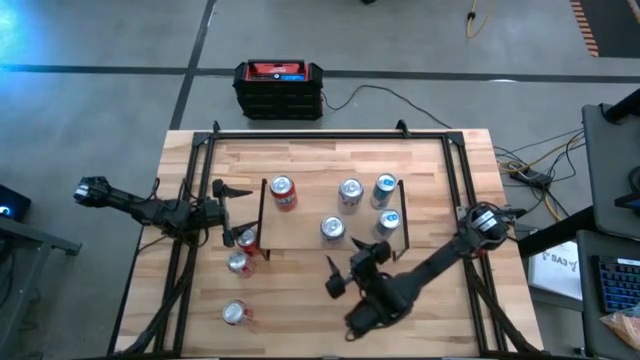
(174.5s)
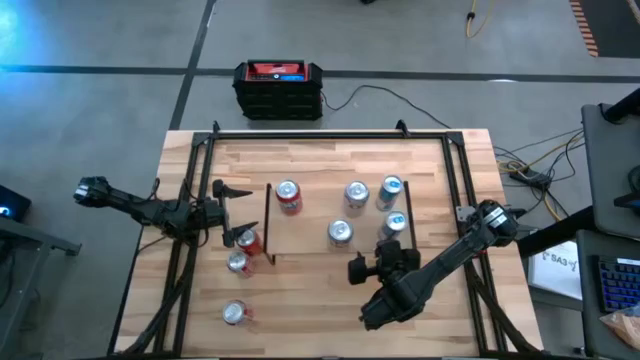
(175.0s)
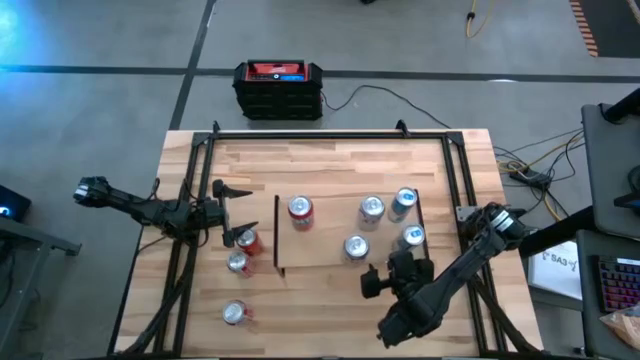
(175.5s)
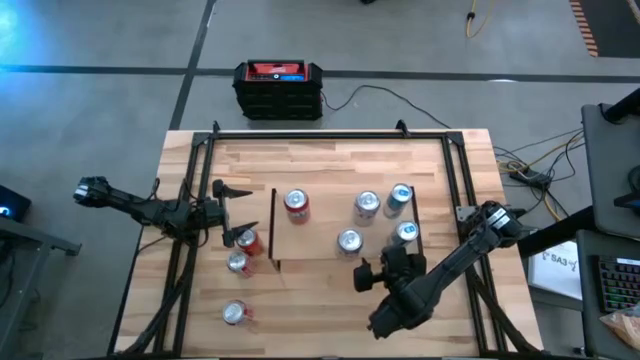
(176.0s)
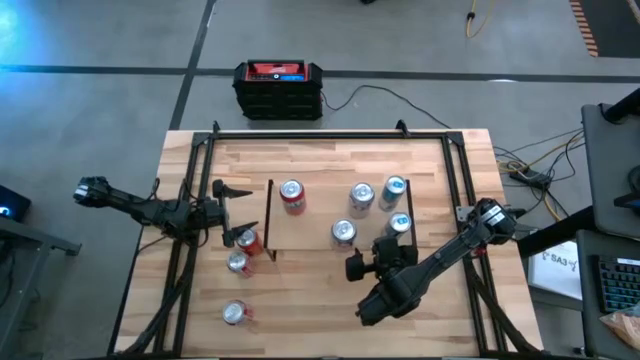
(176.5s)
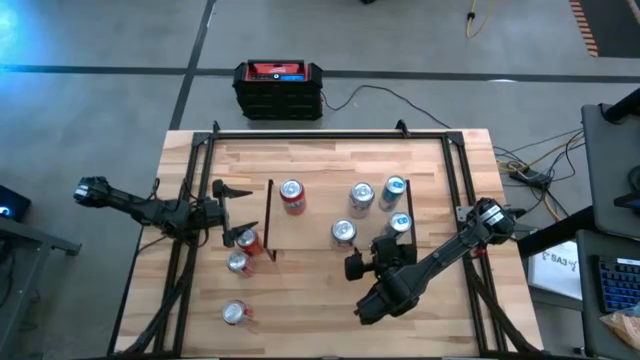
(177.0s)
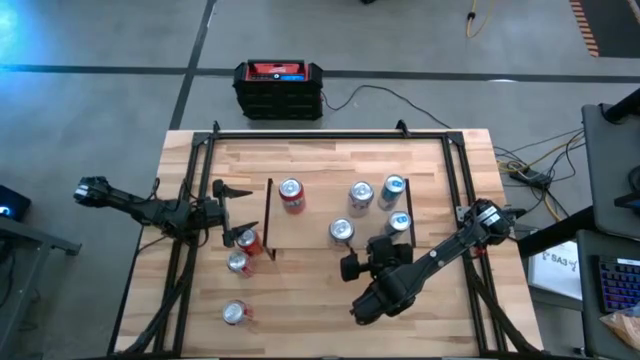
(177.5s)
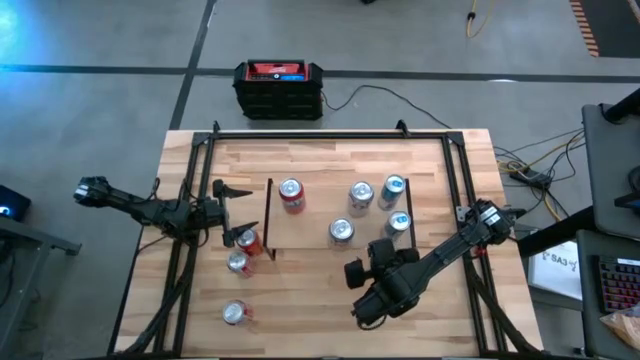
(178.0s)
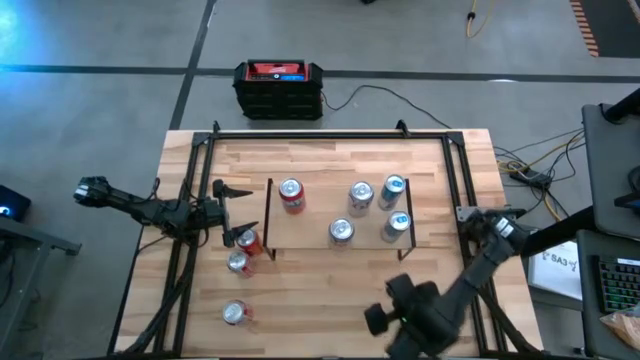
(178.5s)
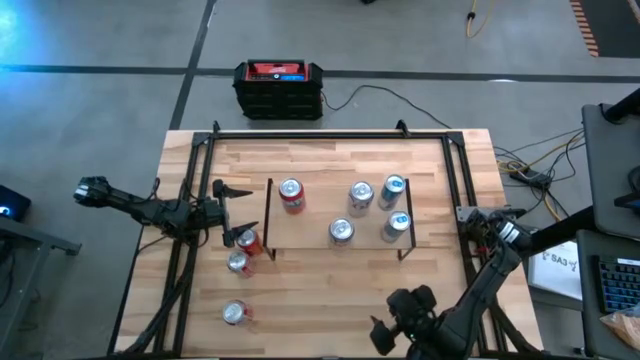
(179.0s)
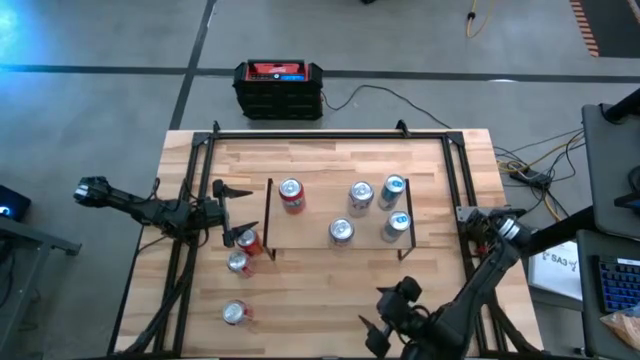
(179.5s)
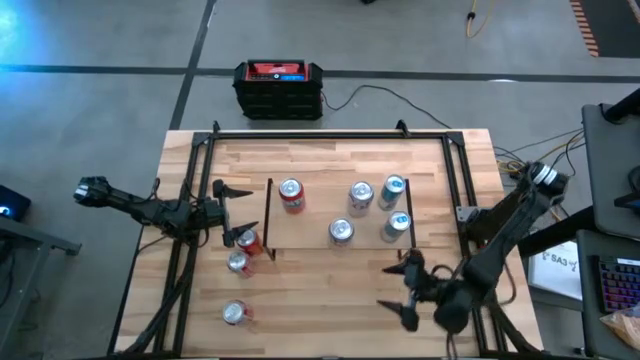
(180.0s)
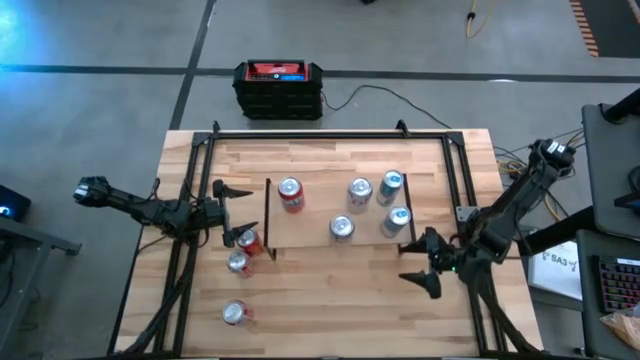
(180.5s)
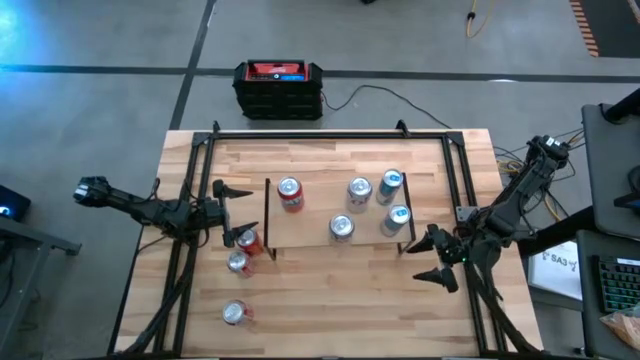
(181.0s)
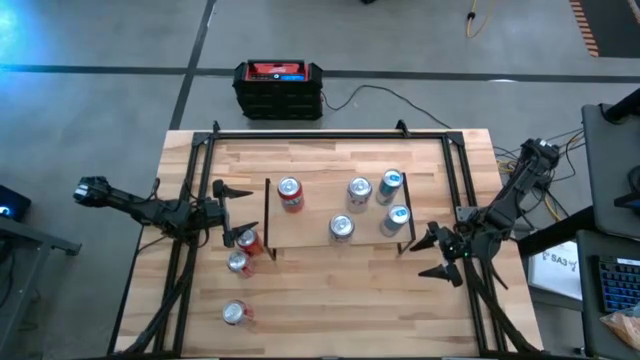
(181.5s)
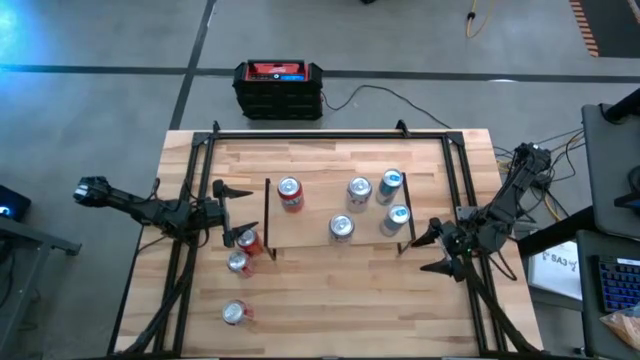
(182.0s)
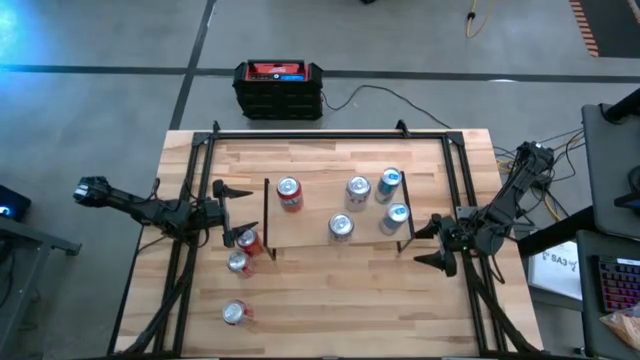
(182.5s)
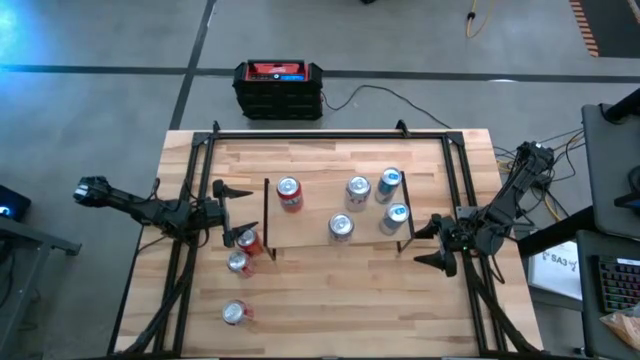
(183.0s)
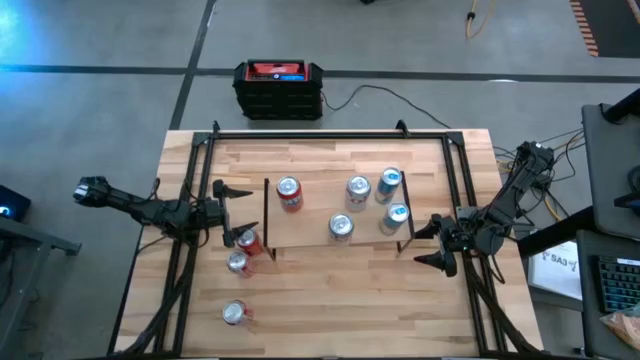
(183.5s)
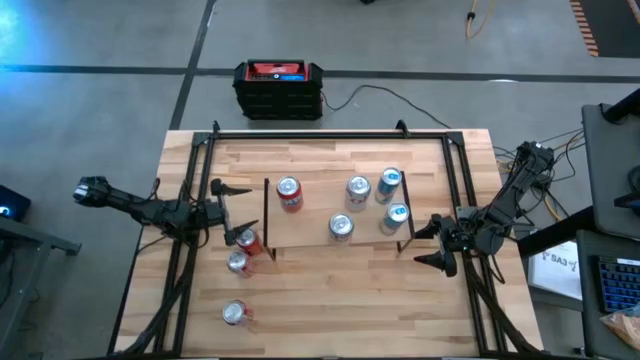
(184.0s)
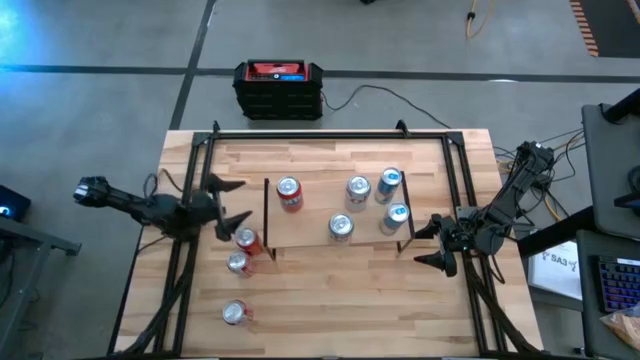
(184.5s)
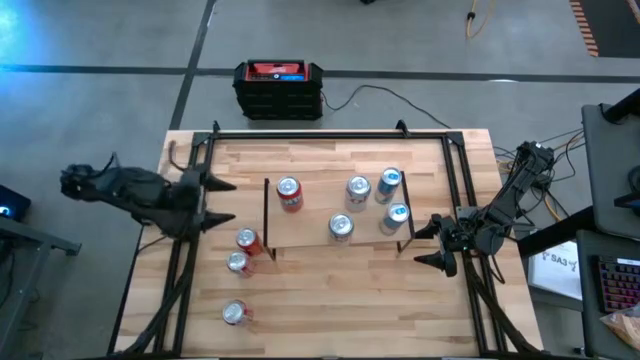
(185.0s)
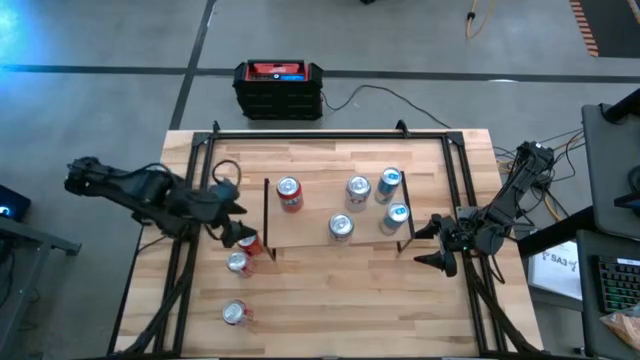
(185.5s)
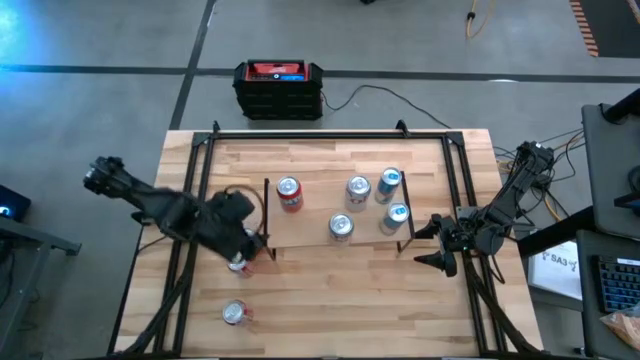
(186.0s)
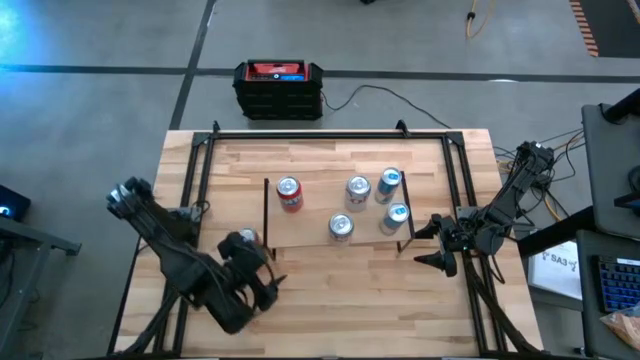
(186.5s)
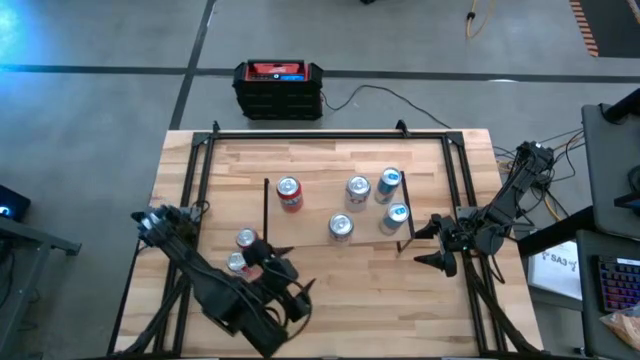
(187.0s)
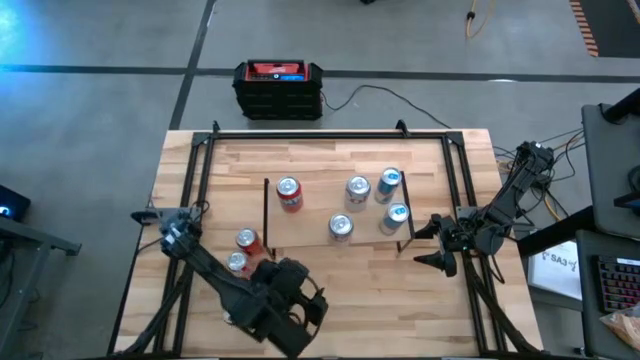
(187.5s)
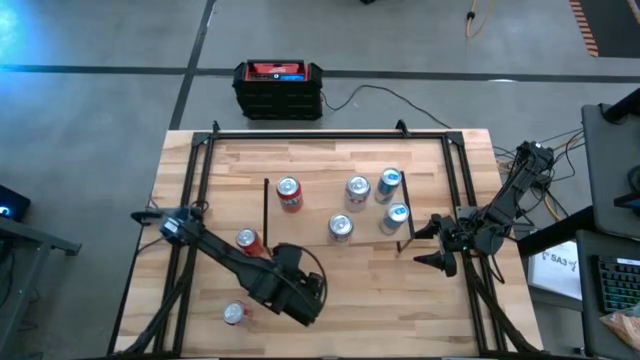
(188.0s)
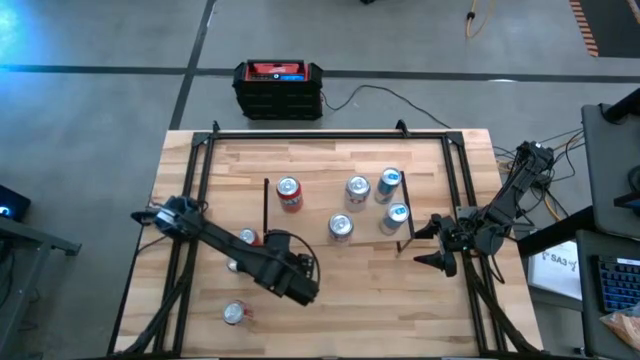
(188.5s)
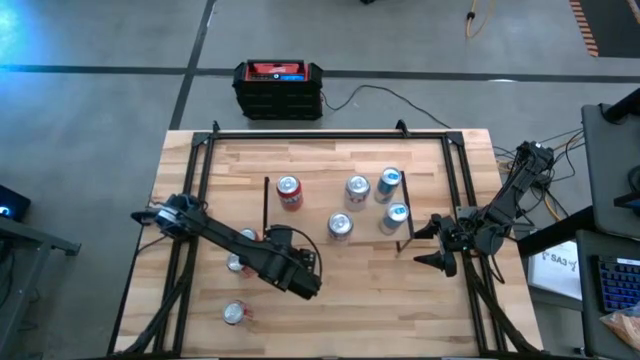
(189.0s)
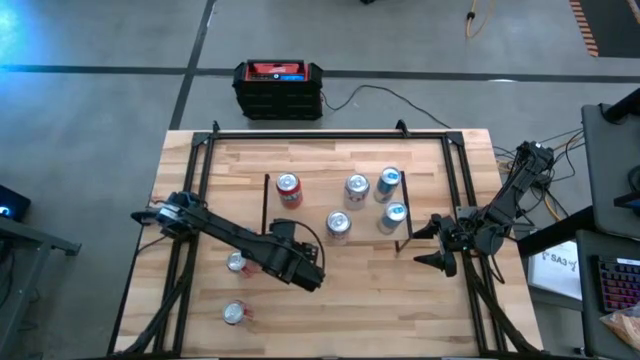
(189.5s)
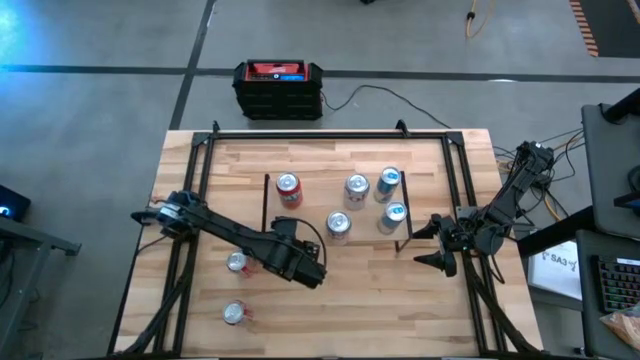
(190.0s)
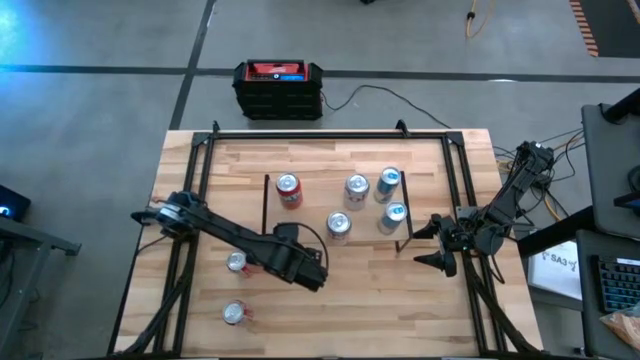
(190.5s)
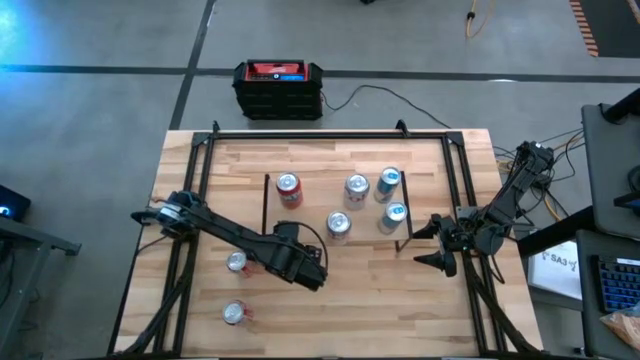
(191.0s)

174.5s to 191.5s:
Task: Place canned beverage on shelf
Adjust the shelf

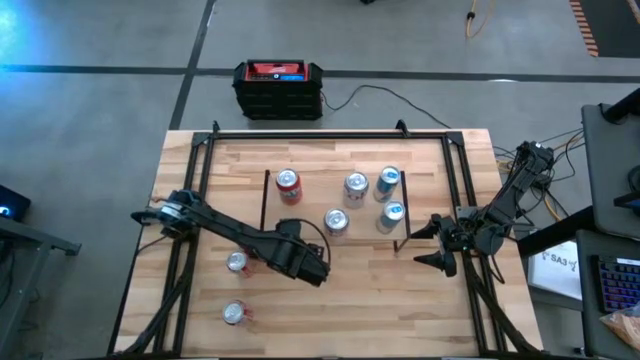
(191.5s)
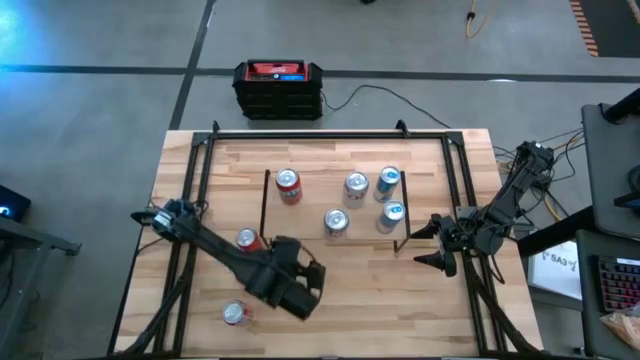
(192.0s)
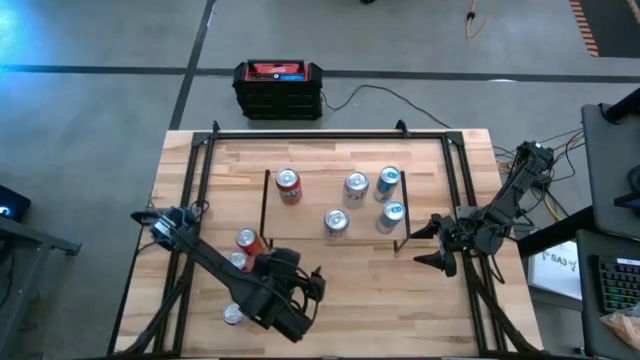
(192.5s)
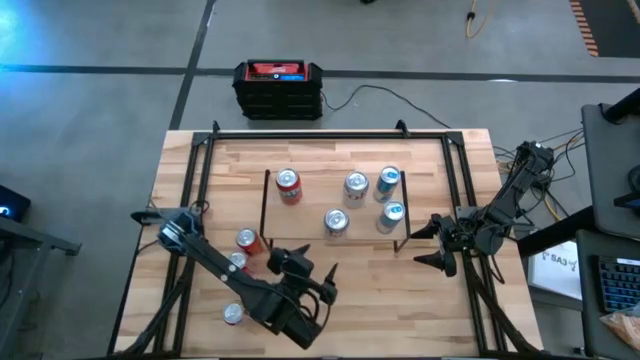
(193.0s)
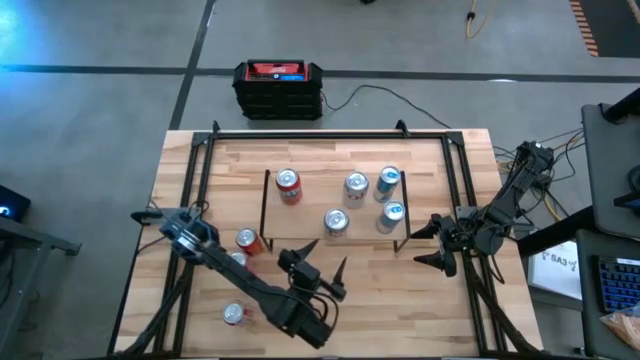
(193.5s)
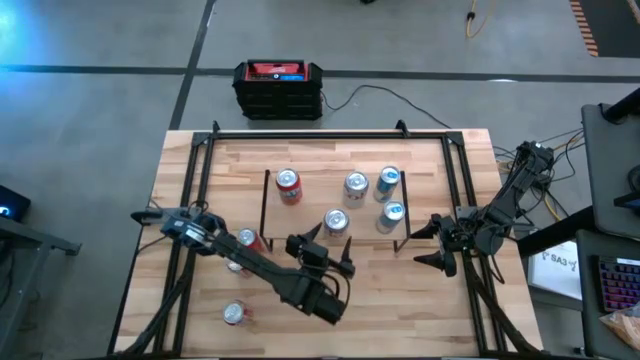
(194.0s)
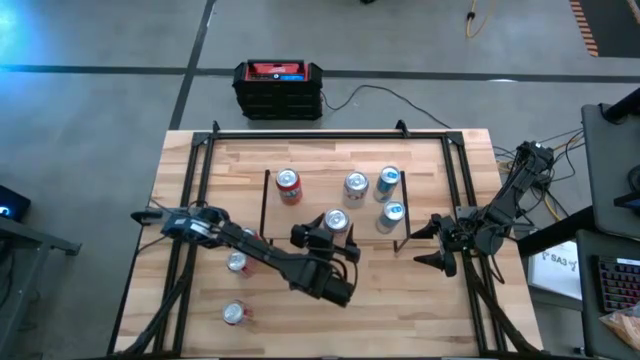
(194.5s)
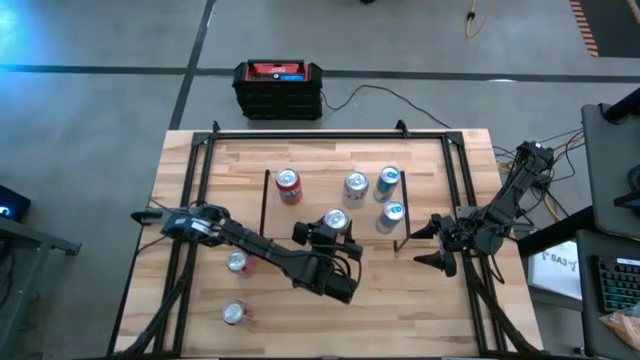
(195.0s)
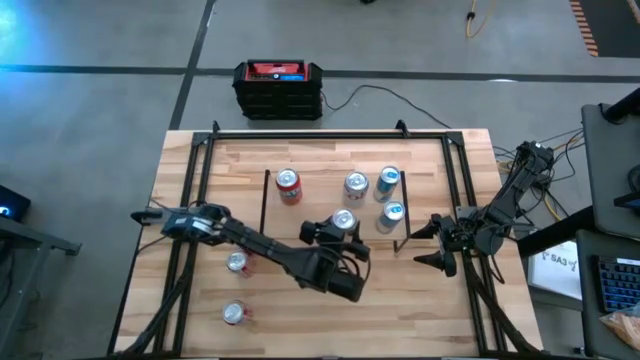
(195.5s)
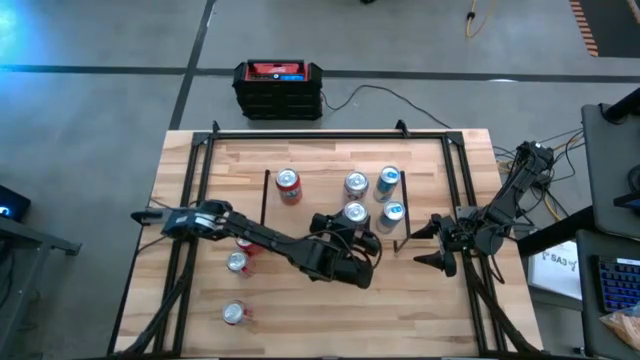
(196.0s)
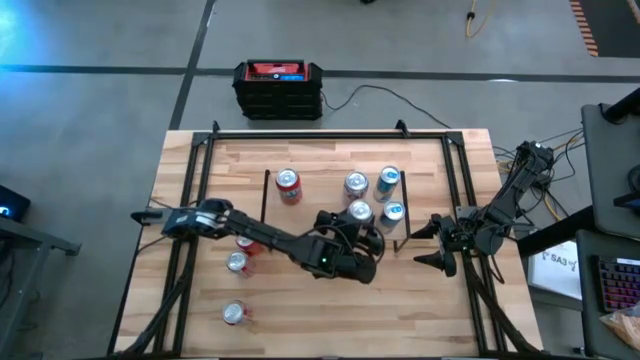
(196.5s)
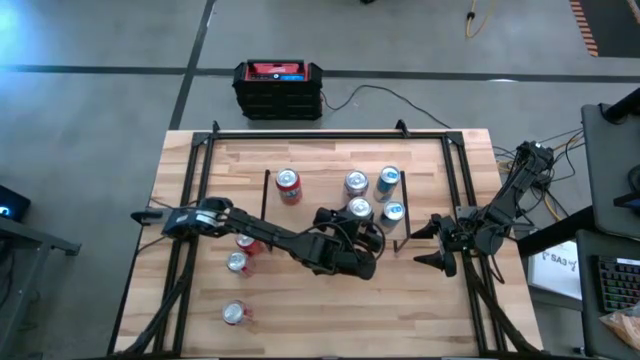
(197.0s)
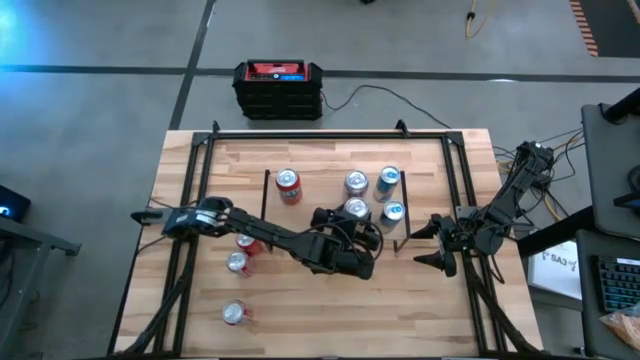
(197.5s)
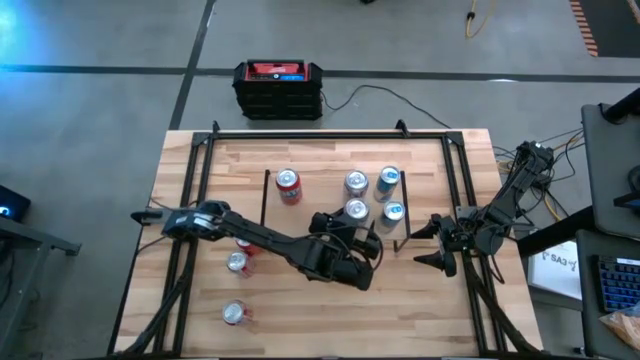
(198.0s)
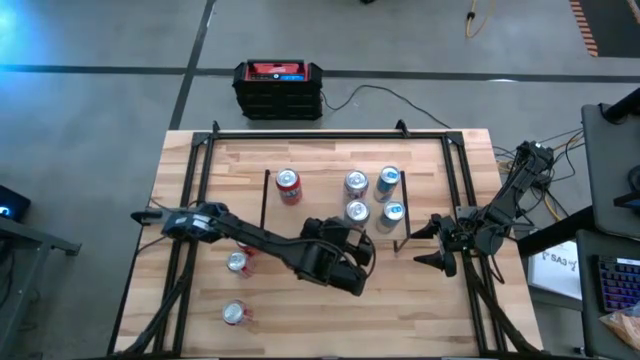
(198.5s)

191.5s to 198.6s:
Adjust the silver red soda can on the shelf
